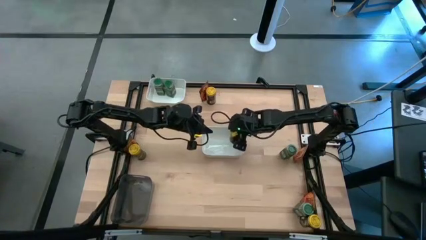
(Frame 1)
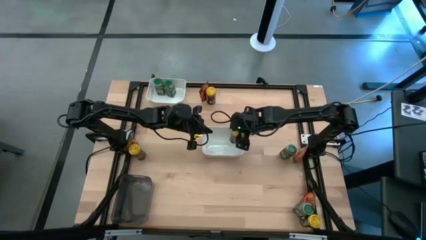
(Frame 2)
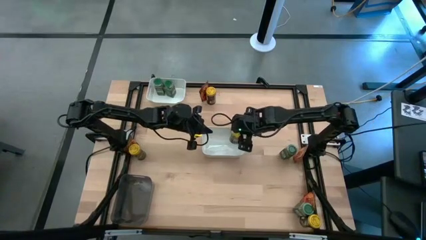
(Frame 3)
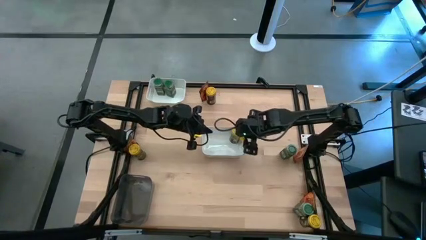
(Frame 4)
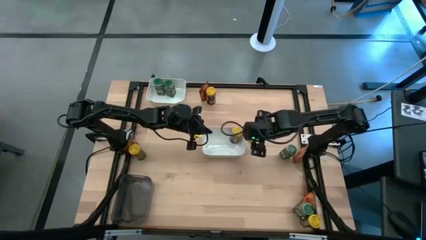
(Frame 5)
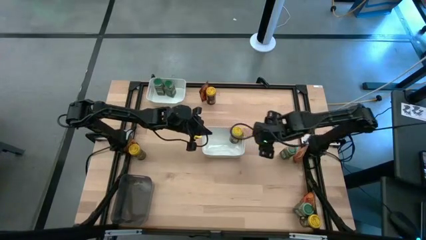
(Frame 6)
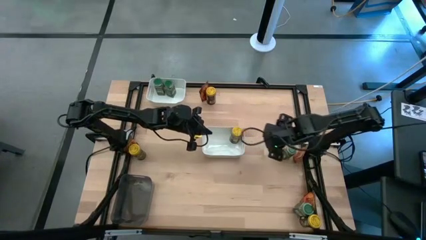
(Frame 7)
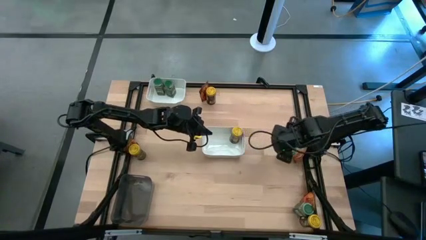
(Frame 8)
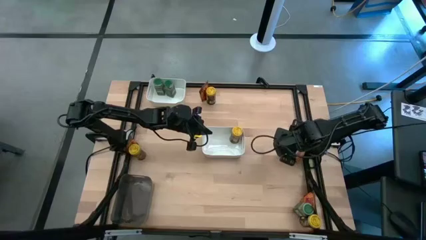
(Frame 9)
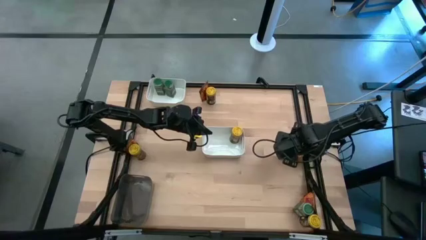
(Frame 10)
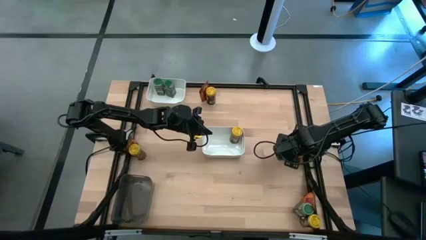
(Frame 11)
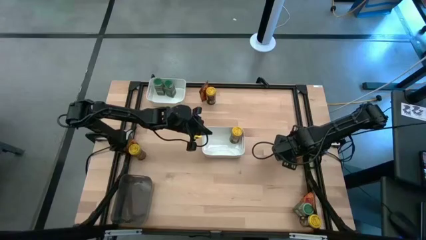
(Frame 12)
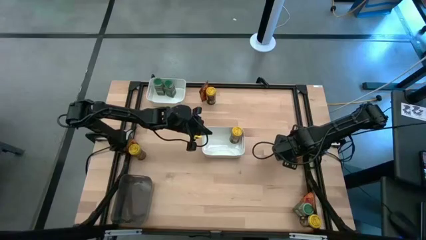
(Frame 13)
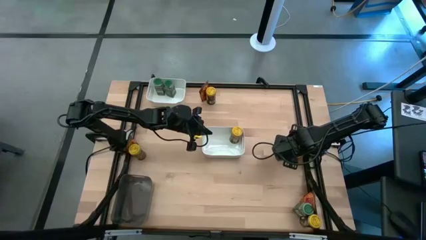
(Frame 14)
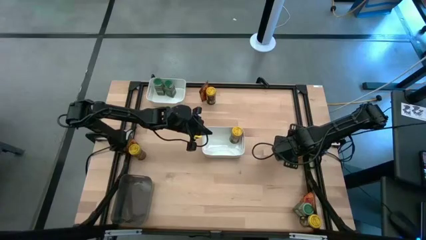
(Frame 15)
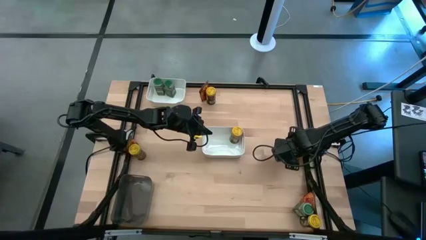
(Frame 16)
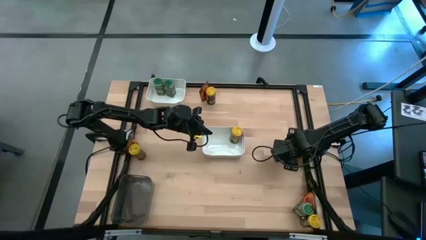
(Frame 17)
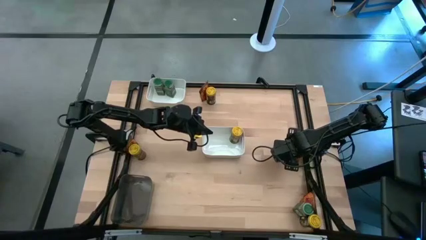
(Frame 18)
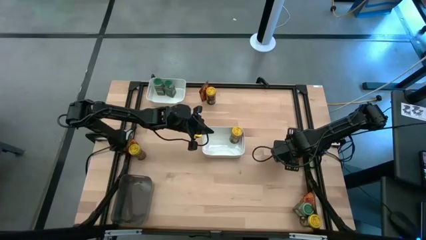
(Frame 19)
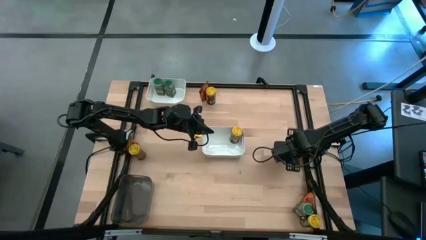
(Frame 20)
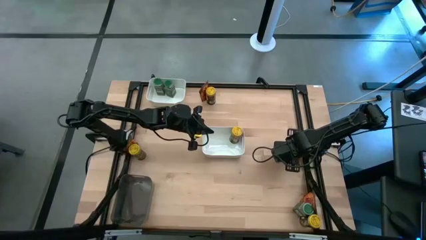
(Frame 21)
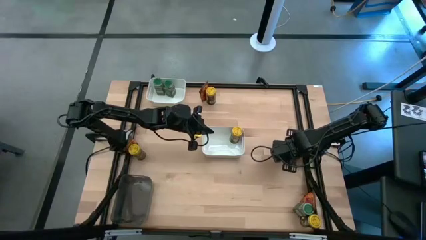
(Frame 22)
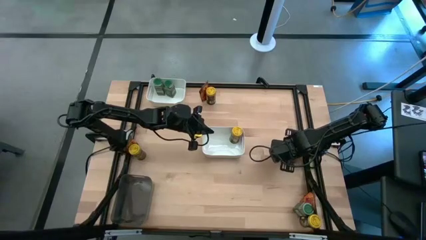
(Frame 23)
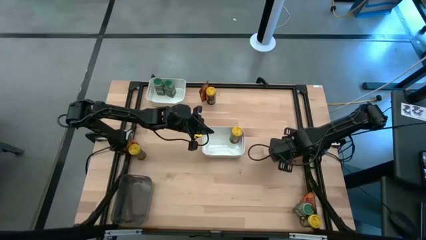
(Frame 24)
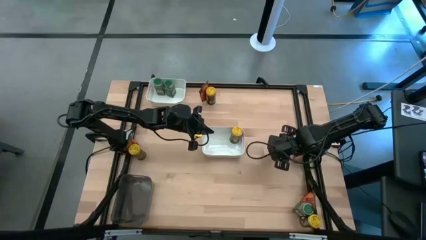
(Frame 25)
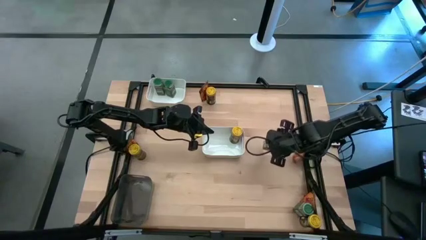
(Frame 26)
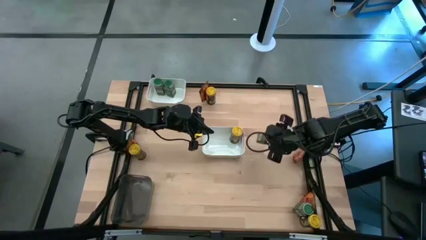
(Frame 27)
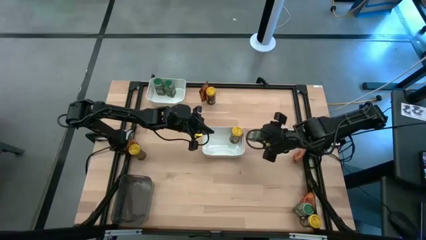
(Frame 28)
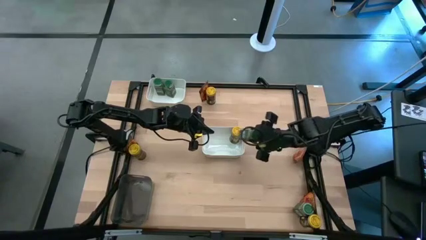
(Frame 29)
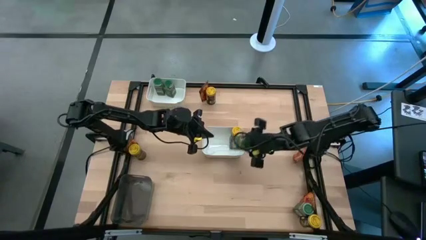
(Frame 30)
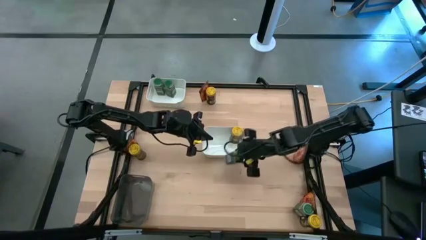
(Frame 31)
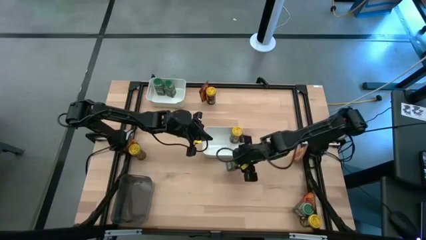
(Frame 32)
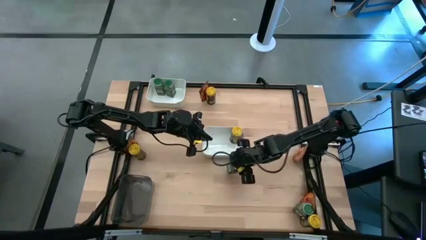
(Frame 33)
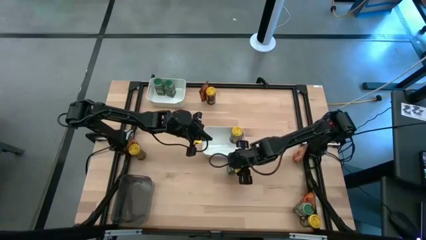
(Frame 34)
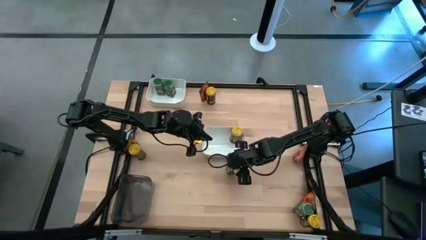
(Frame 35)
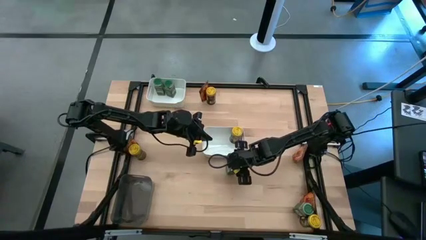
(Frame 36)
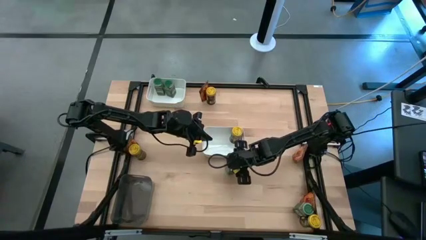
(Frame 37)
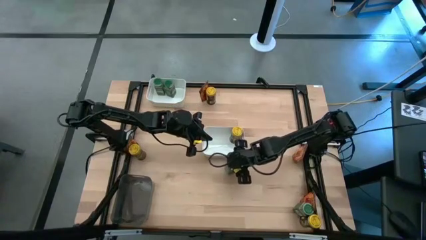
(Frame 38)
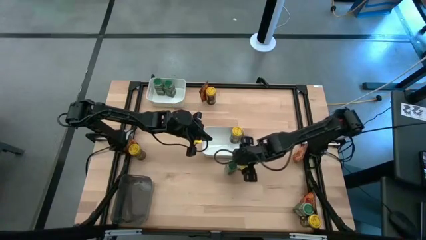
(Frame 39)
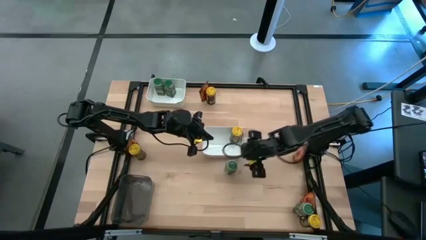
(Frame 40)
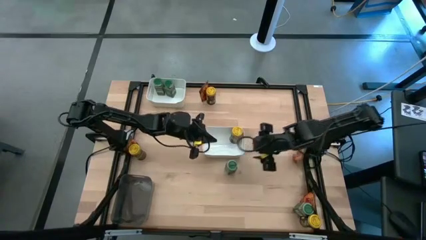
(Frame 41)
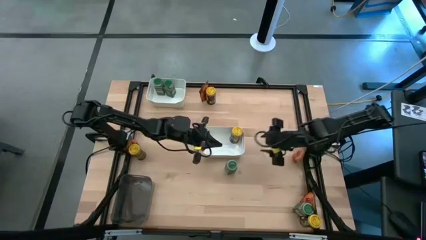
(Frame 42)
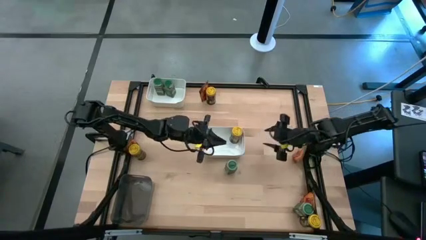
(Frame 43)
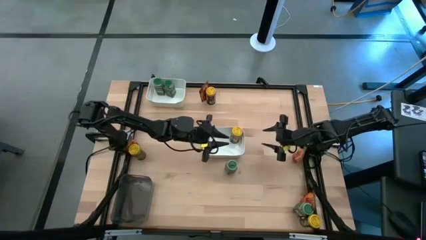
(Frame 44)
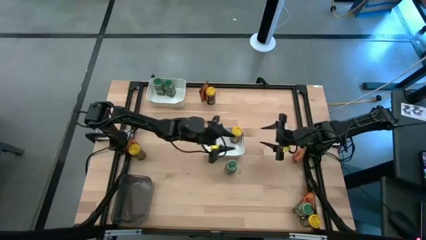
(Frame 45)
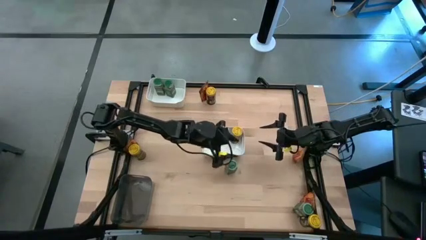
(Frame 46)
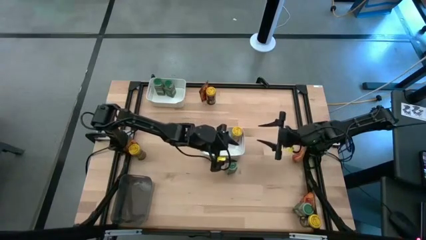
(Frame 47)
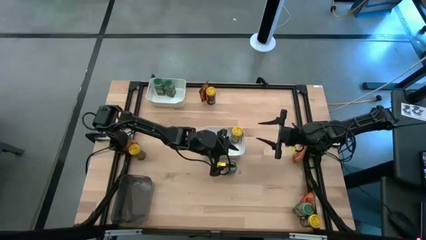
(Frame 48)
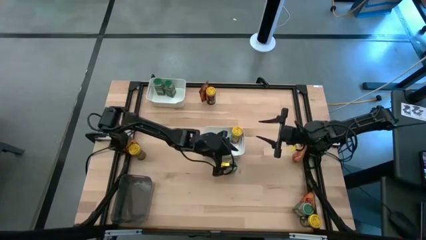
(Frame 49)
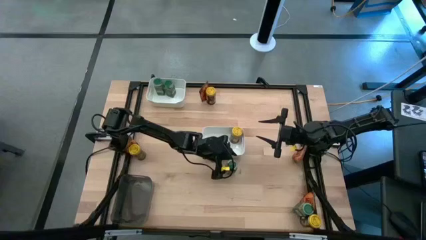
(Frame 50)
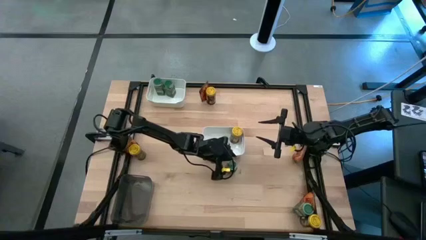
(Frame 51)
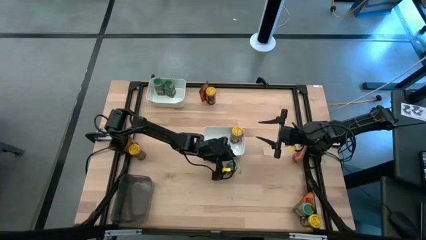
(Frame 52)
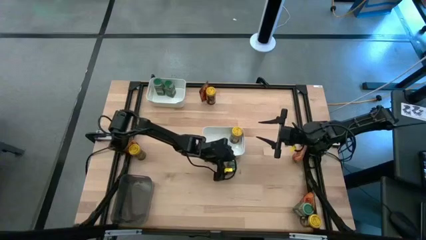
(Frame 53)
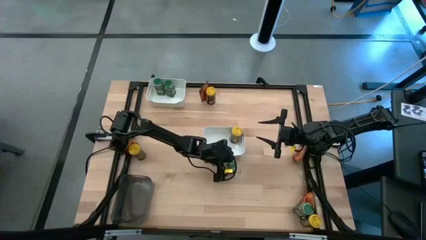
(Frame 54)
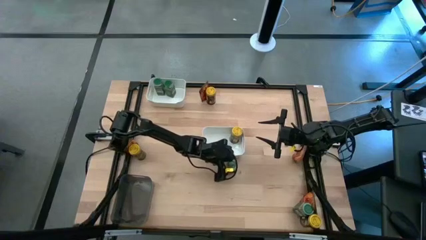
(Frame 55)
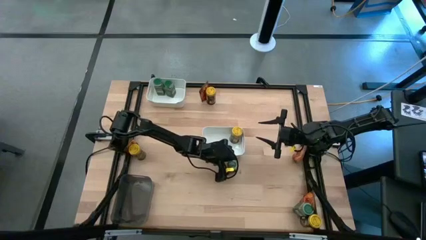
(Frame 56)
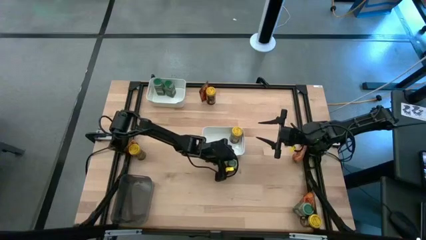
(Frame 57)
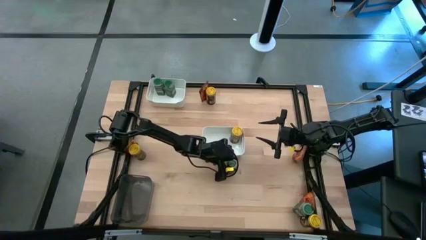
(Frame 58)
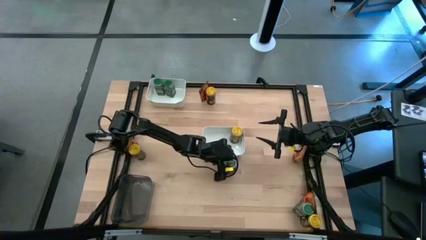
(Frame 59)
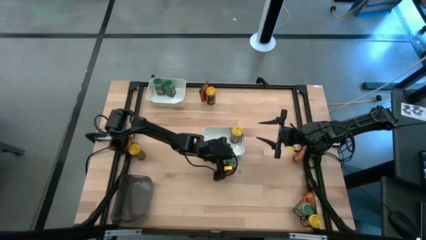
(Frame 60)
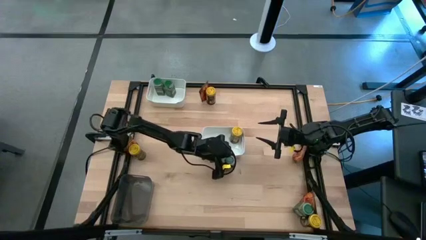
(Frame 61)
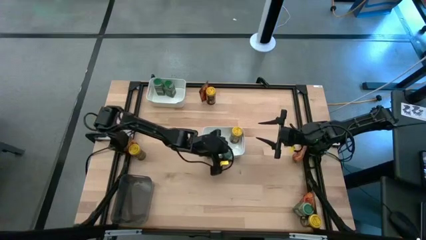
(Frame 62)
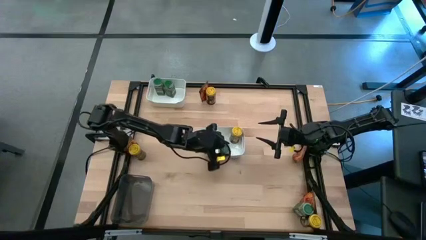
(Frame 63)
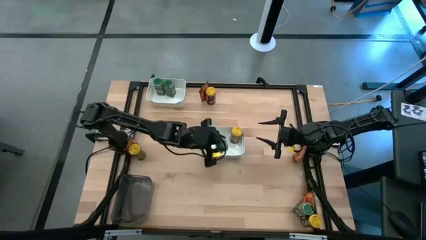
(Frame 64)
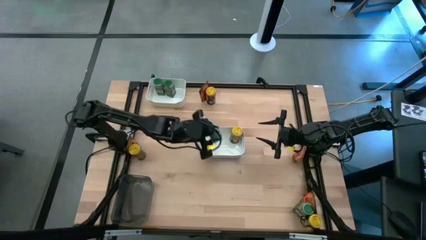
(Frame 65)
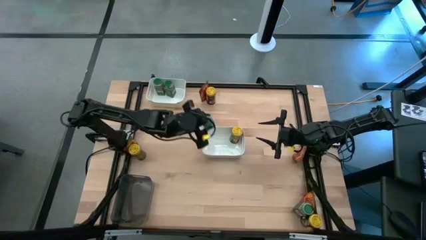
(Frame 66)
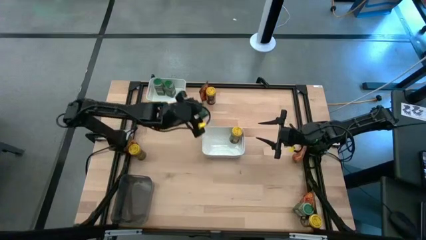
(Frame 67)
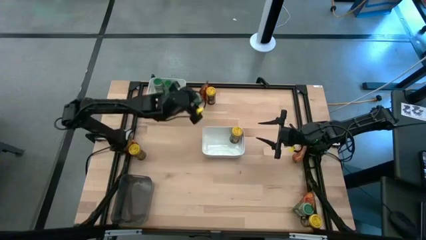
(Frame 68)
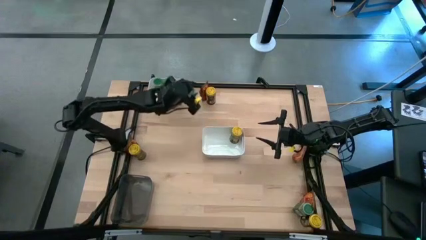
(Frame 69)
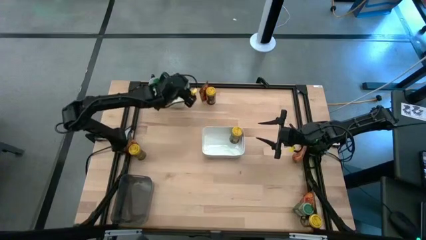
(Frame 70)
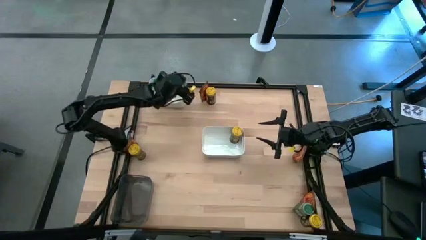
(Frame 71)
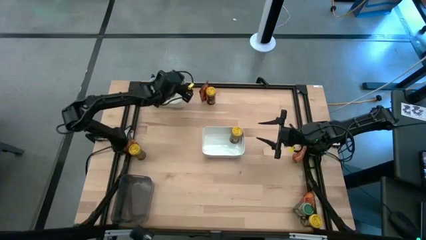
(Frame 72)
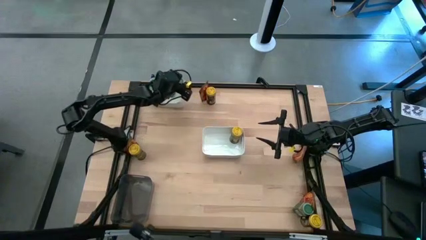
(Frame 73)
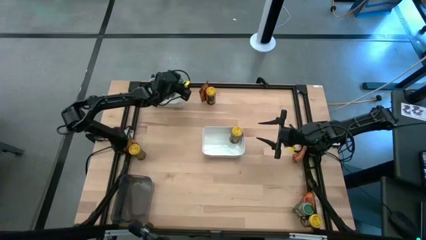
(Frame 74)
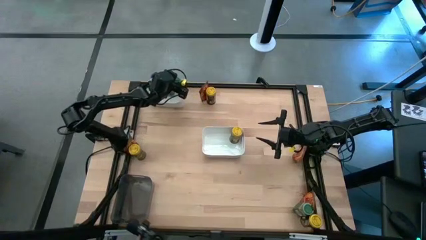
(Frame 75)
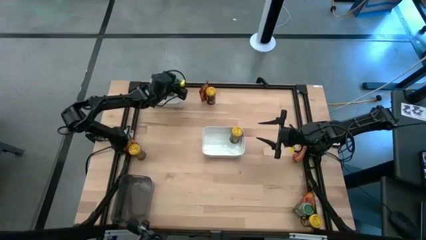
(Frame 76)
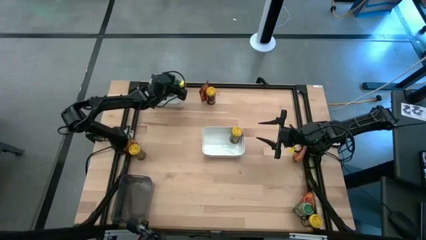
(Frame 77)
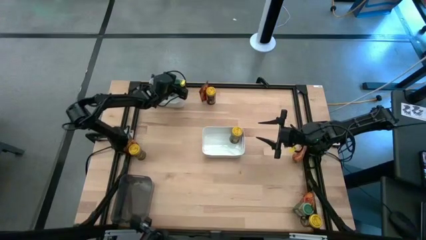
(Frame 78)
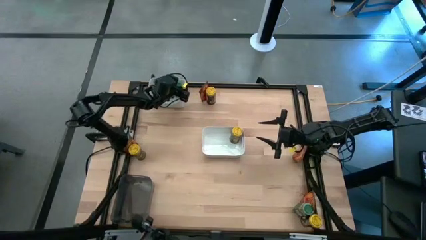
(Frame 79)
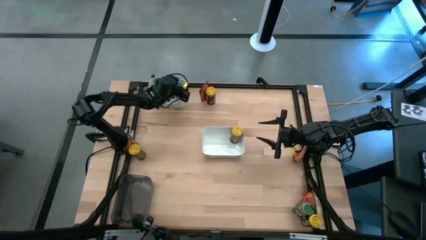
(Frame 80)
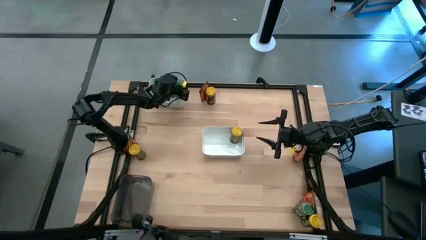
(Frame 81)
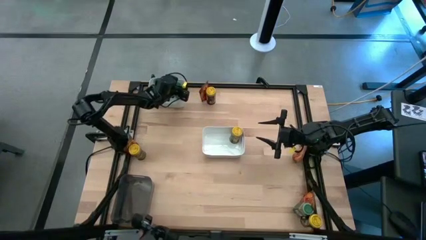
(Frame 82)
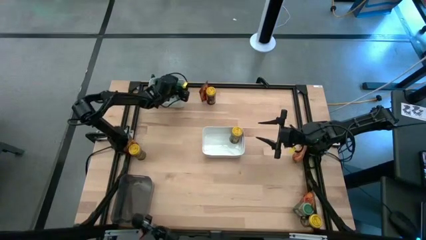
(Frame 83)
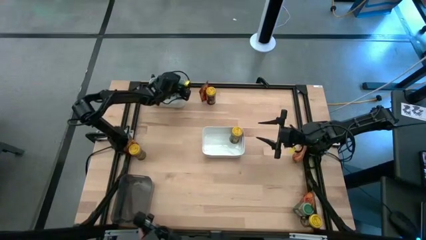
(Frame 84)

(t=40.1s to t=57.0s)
Task: Sort spices by type
Put the green seasoning bottle into the top white bin
